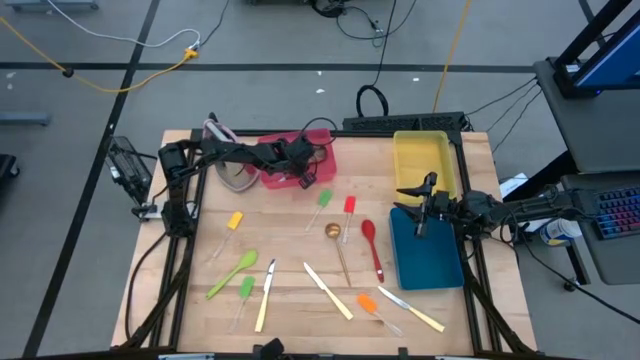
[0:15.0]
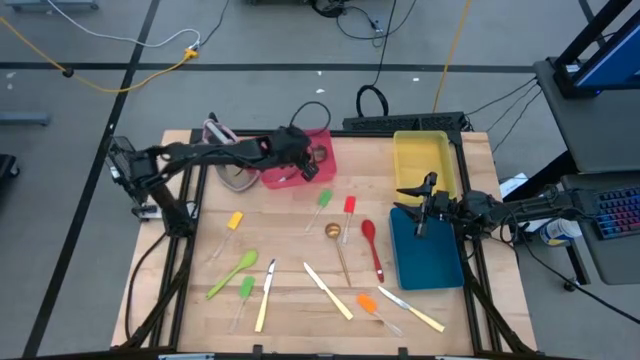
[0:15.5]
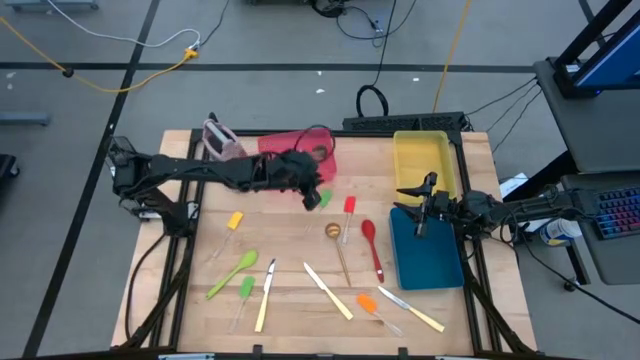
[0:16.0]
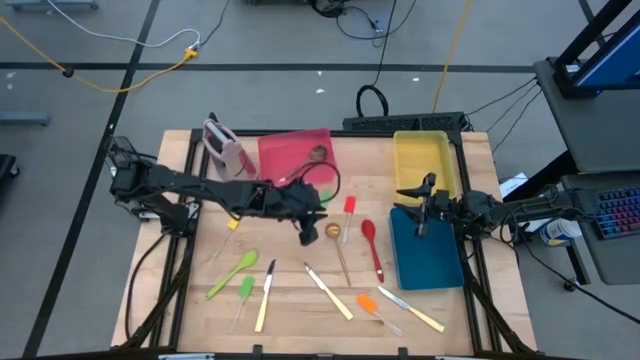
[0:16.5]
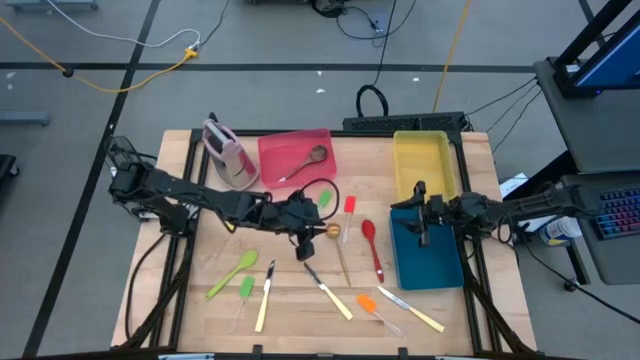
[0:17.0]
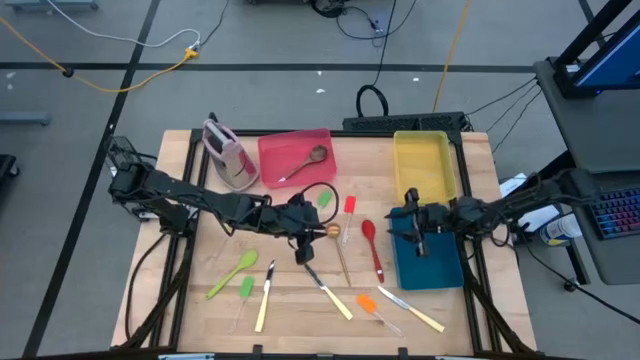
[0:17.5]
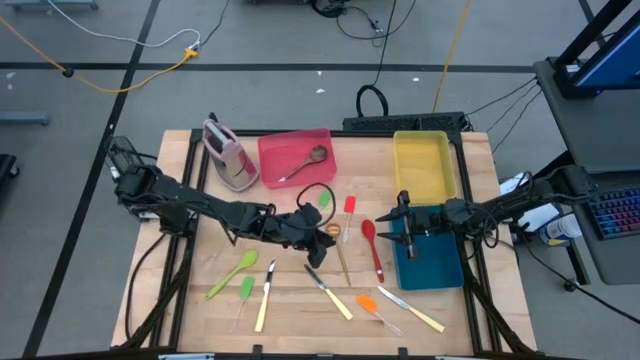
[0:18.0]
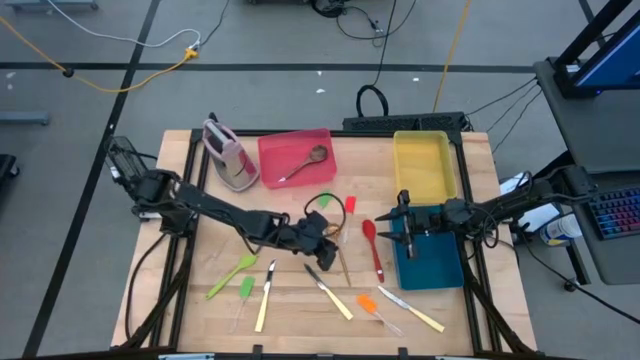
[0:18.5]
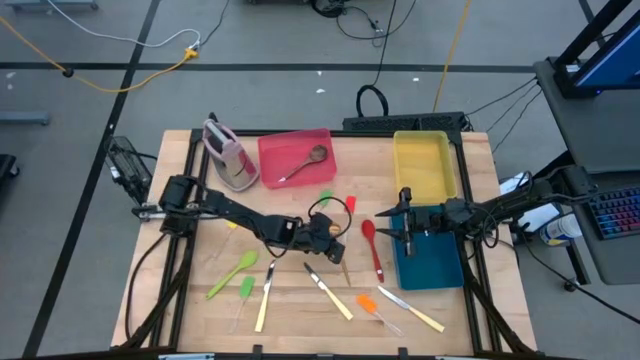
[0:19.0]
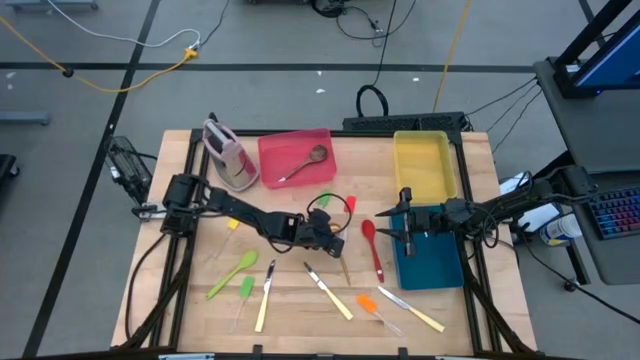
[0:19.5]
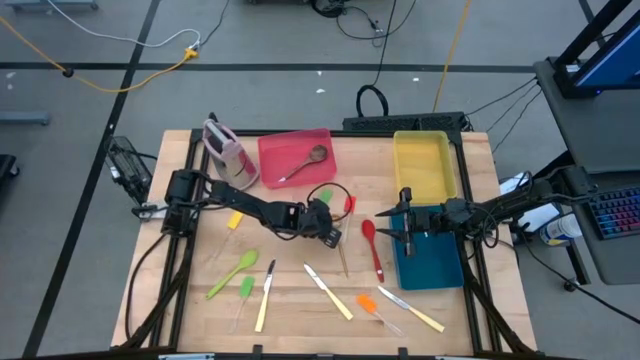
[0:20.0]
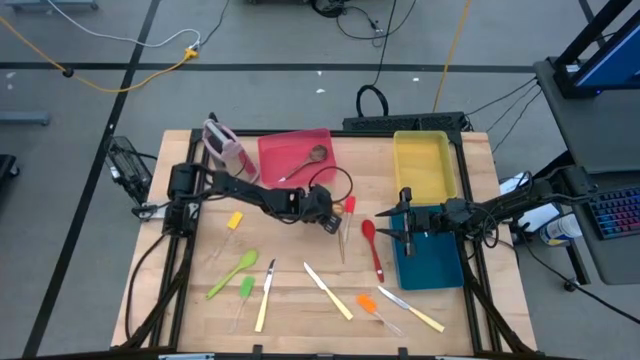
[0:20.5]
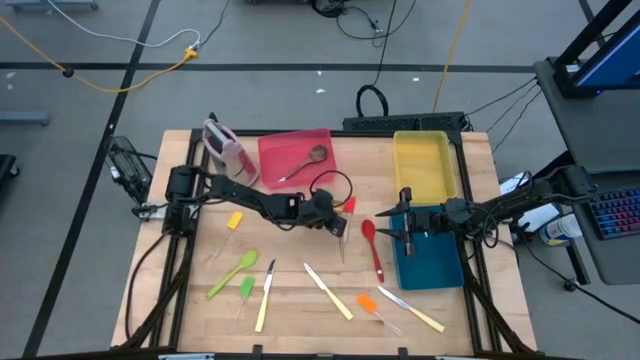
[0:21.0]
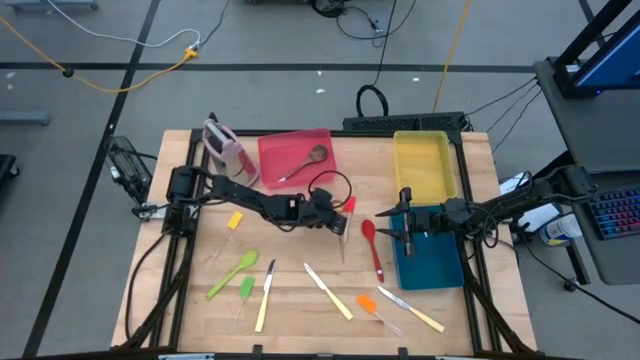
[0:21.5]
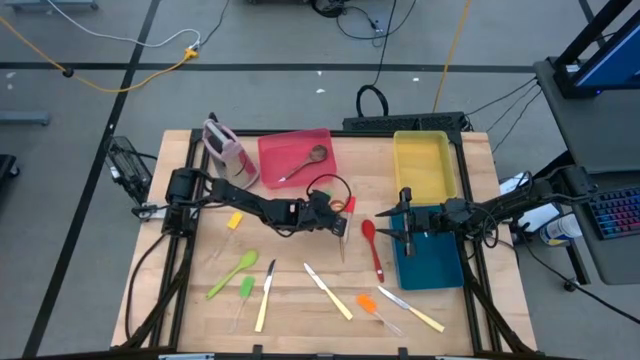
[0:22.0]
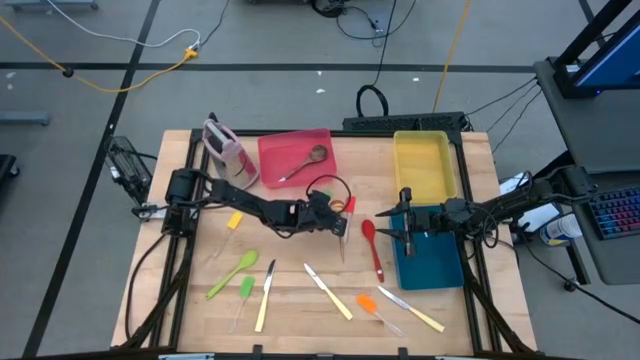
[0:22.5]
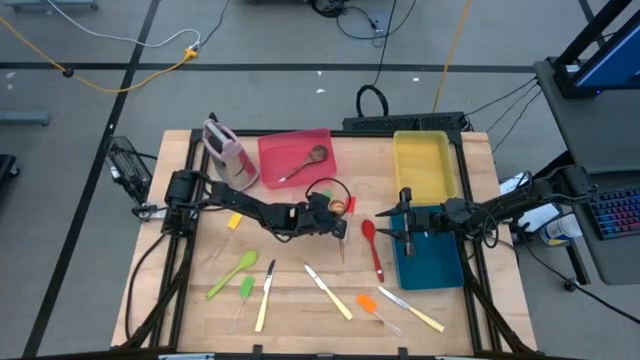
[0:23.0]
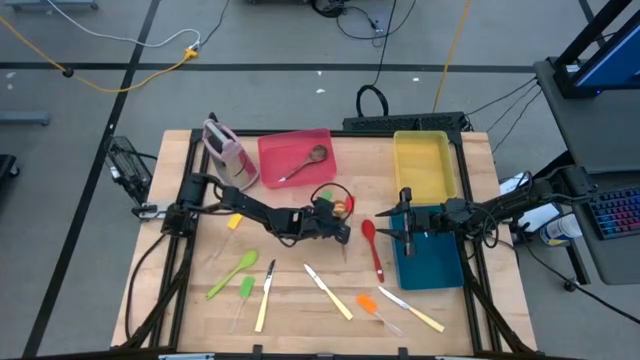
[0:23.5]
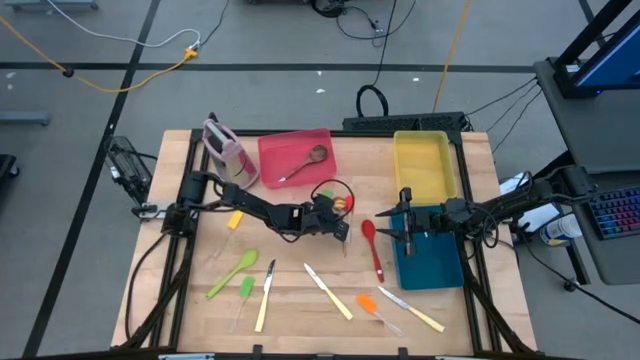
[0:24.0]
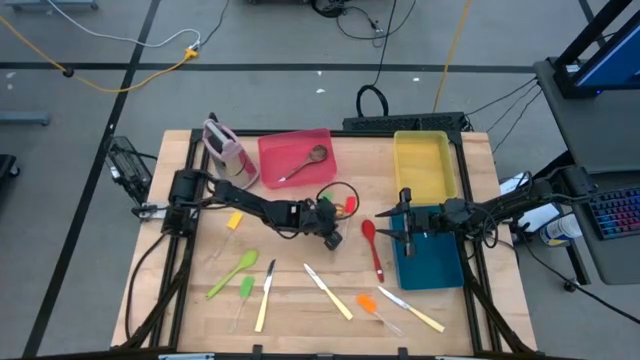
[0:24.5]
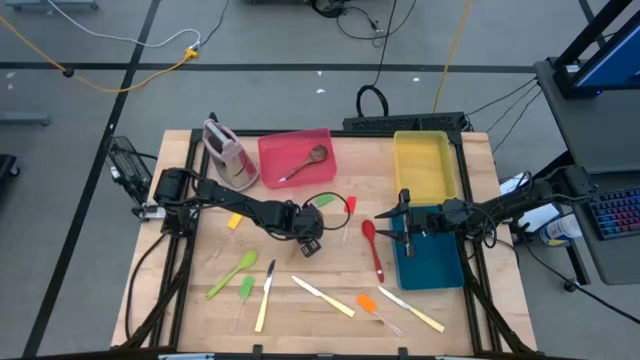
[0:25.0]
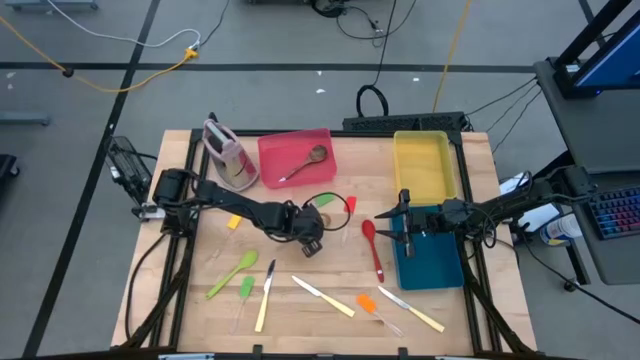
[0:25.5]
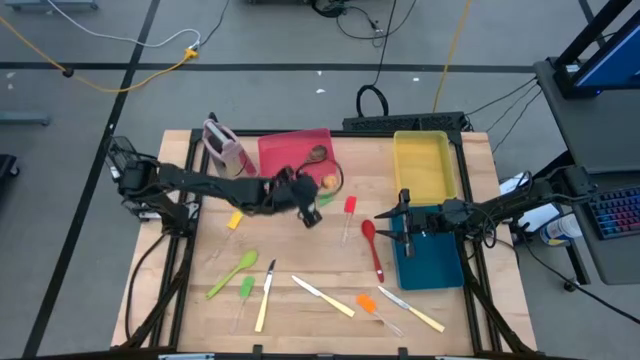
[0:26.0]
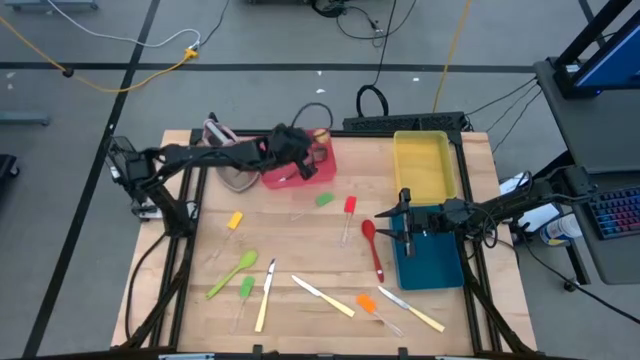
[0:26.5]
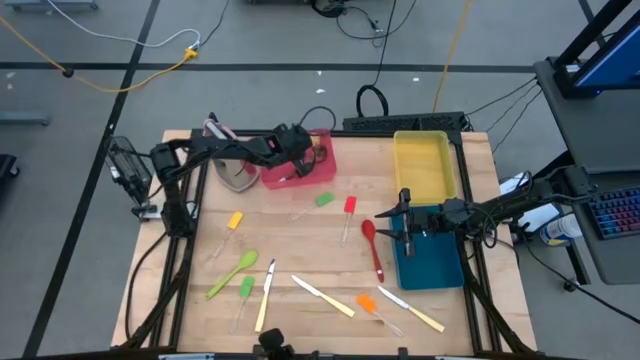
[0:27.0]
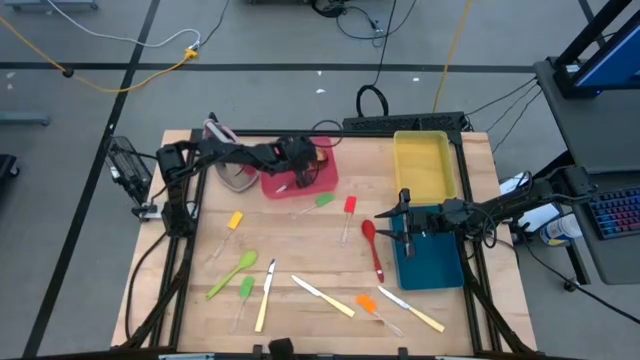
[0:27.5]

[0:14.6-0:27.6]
Task: Pick & Place Kitchen Items
Put the gold serving spoon into the red bin

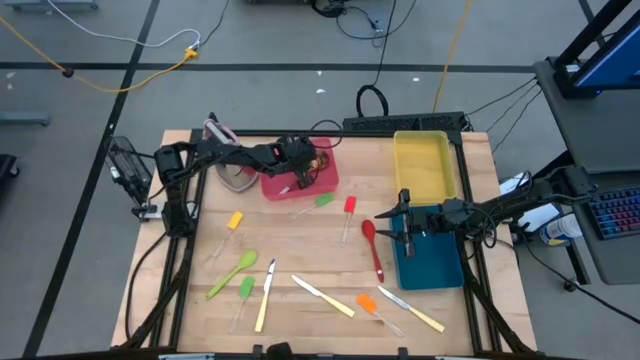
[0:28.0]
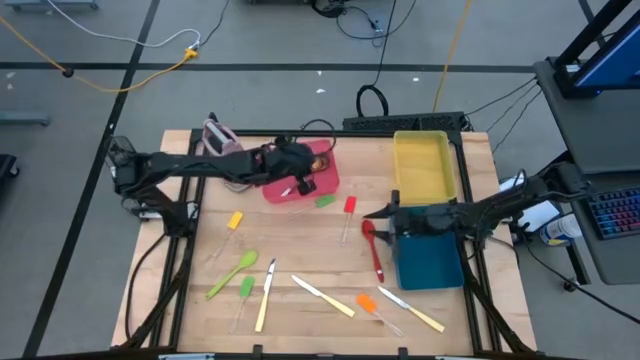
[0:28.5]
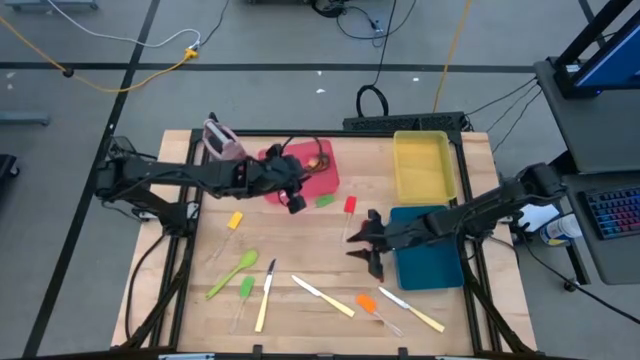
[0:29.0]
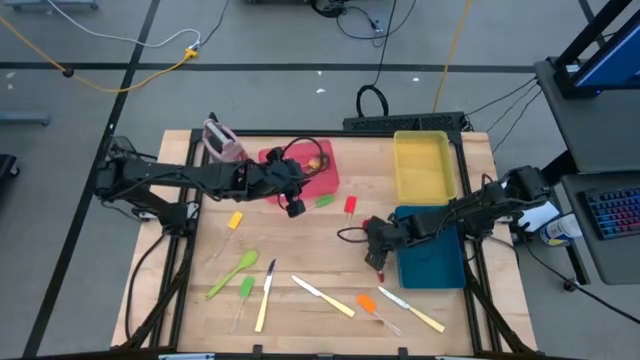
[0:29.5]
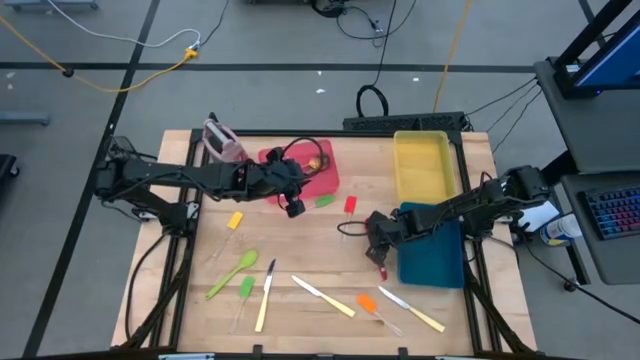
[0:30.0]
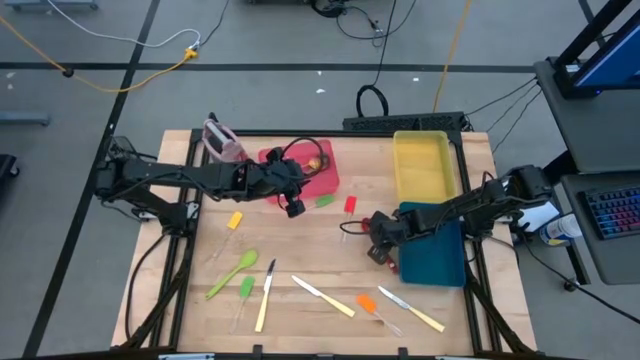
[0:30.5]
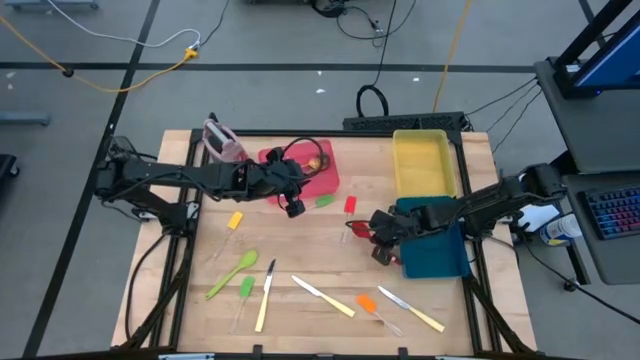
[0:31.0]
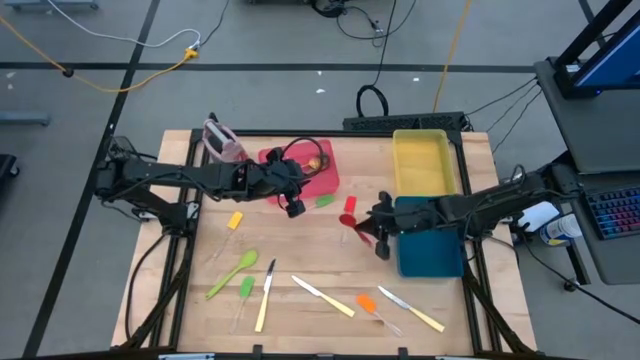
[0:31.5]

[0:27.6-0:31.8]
Put the red serving spoon into the red bin

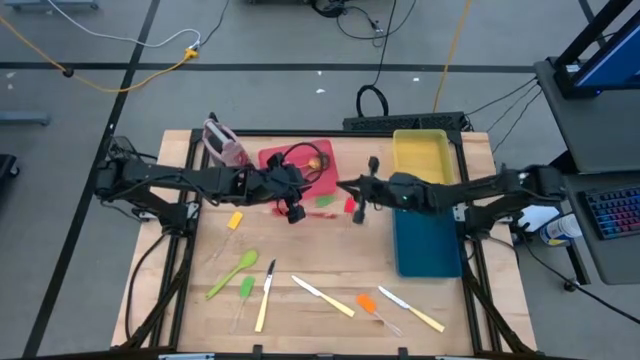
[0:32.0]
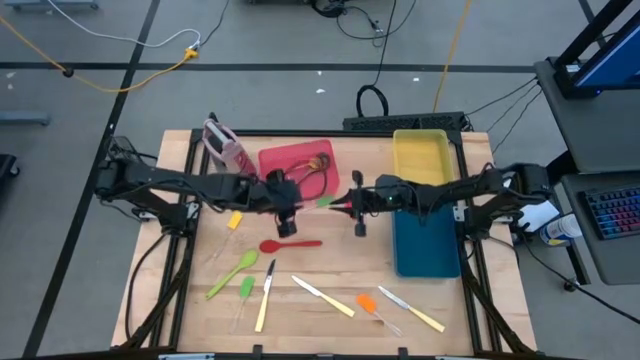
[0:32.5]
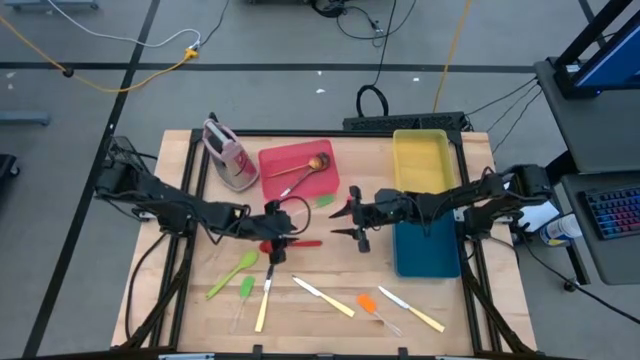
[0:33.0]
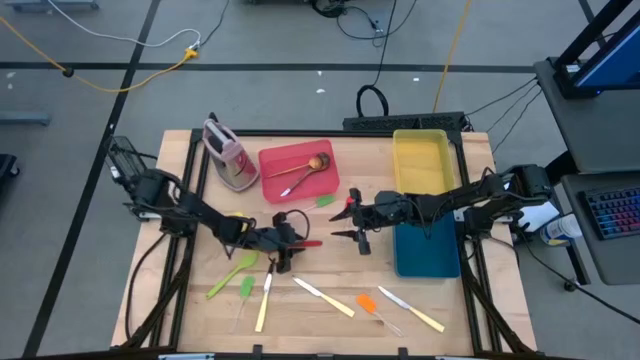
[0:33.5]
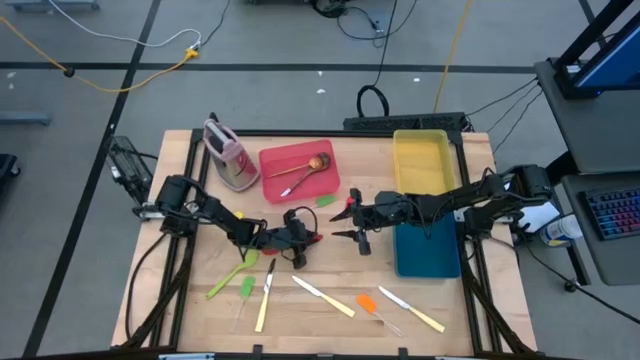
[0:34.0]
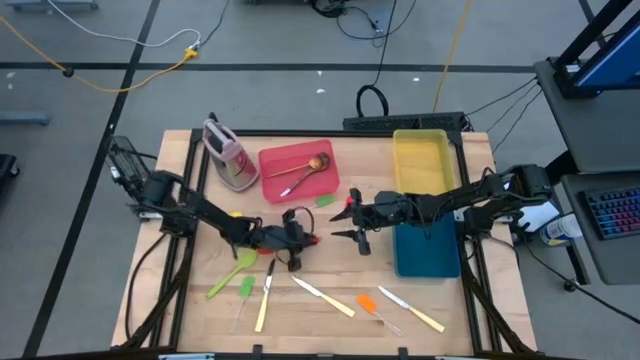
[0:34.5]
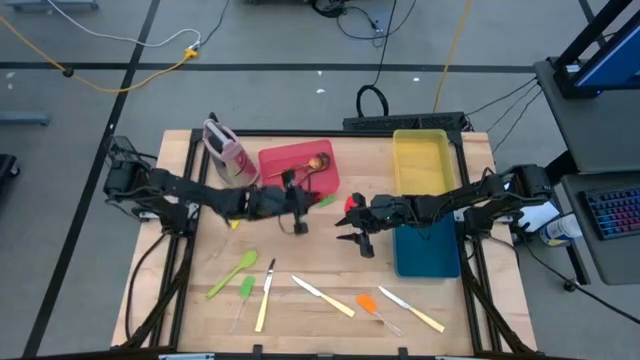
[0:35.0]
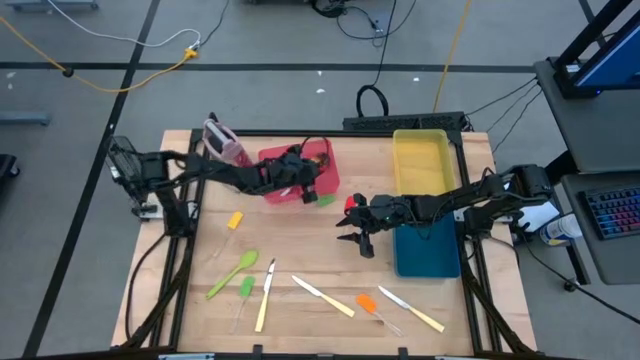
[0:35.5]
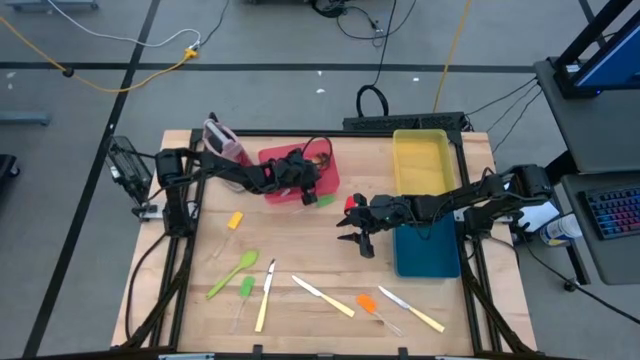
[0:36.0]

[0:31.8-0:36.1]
Put the red serving spoon into the red bin
